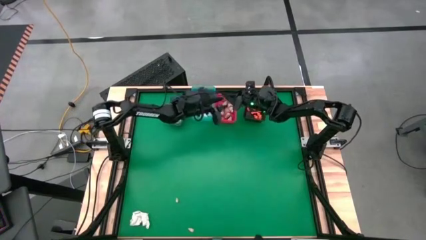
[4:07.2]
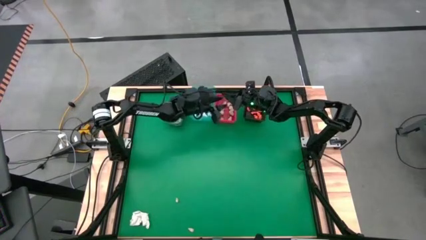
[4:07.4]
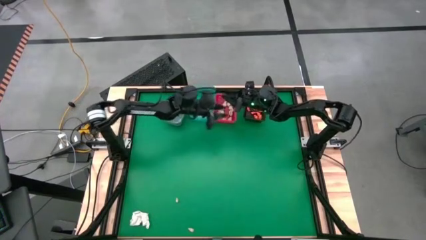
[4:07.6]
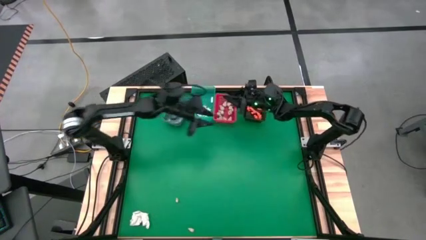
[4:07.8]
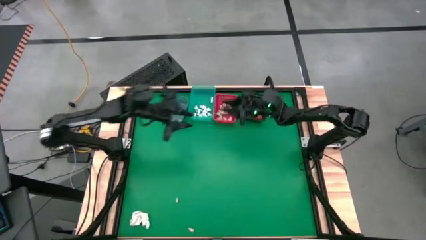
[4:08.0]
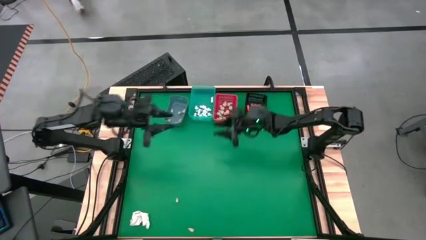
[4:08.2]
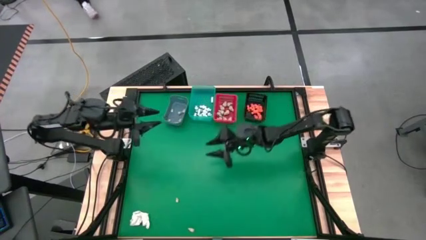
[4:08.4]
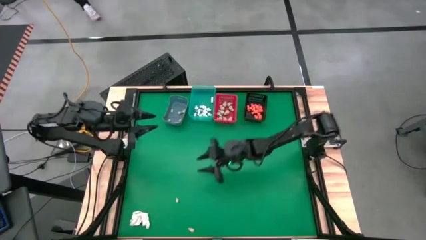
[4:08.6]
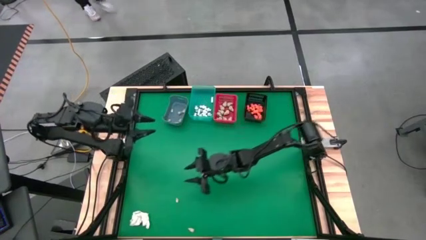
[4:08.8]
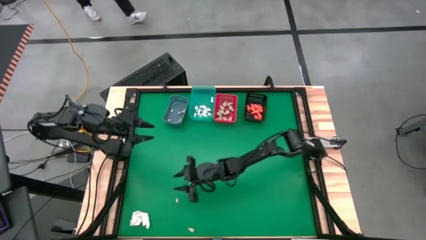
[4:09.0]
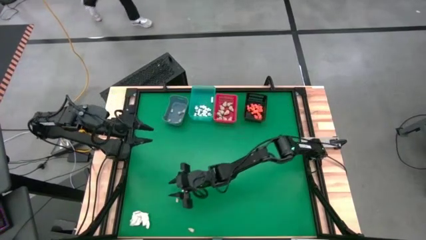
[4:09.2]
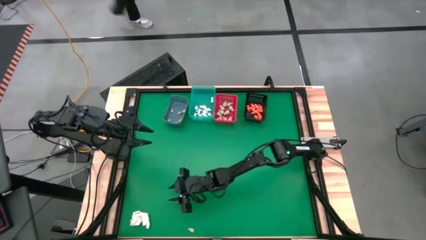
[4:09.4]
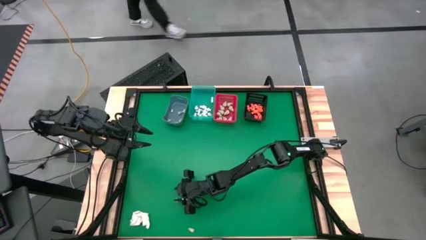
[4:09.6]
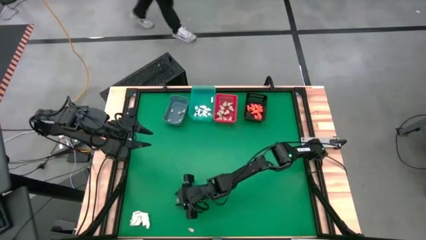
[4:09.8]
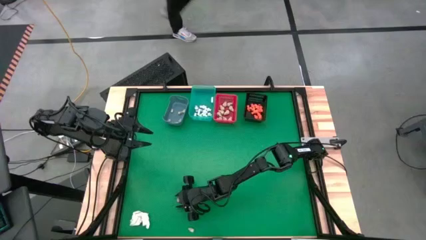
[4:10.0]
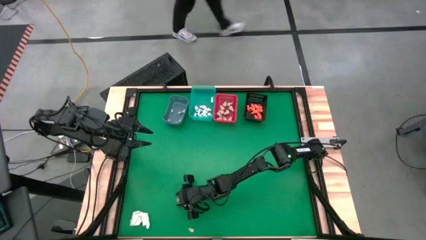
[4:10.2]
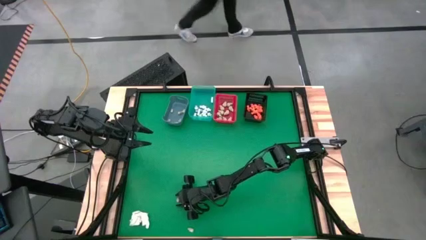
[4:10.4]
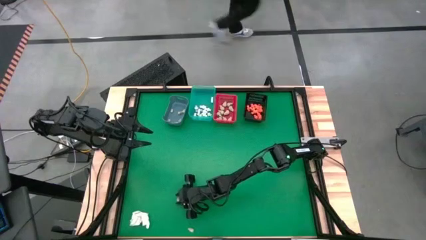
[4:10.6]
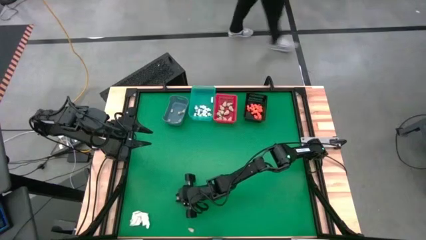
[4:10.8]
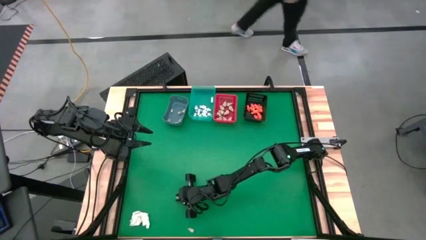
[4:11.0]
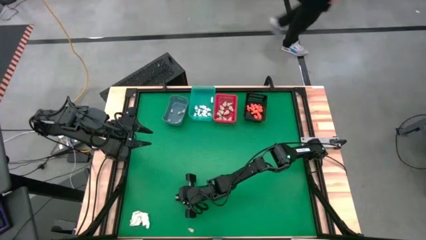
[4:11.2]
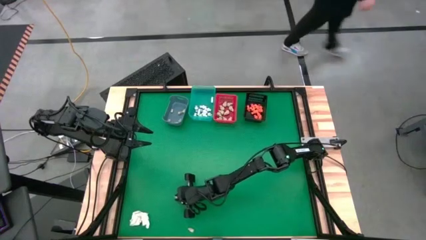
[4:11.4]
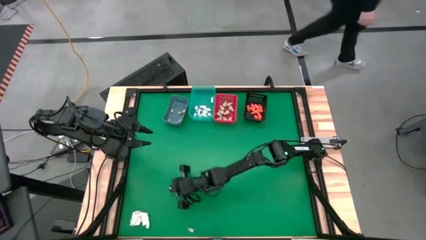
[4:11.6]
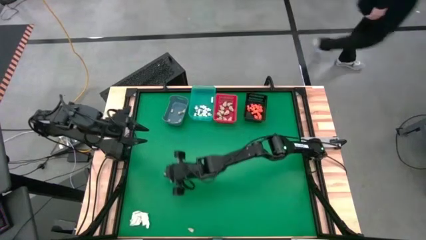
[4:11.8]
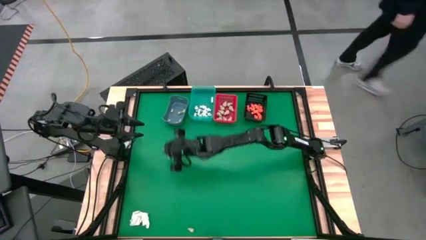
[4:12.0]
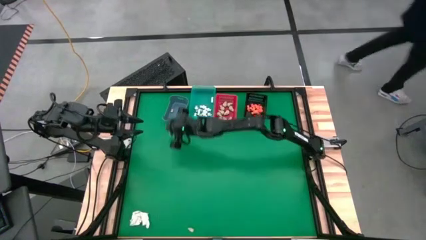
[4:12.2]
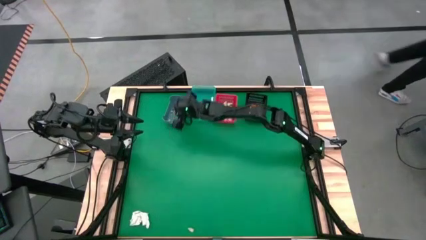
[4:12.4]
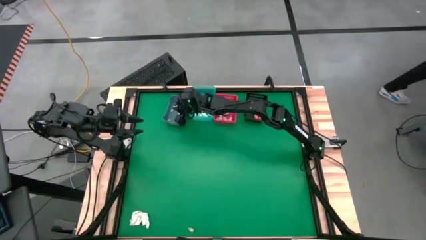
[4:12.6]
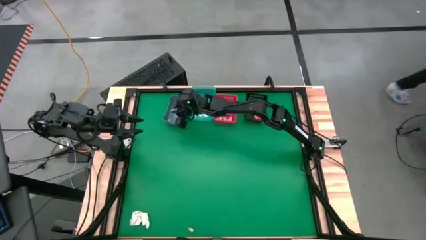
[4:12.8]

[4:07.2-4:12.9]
Task: Sort Halloween decoration
Put the white skull toy into the blue bin

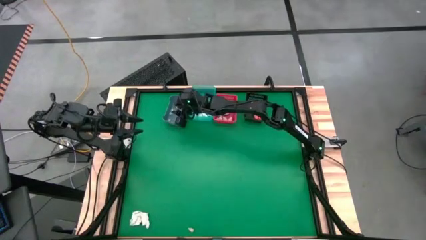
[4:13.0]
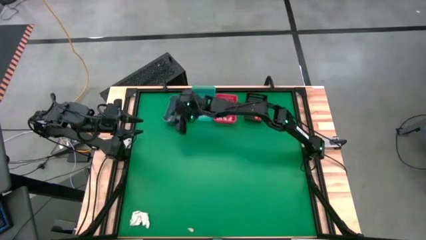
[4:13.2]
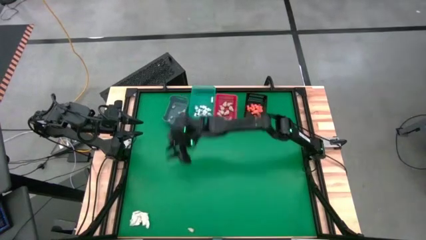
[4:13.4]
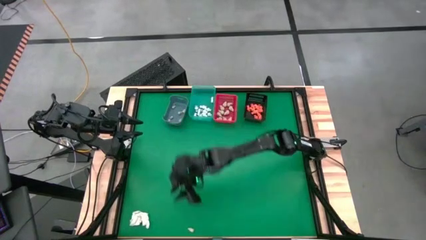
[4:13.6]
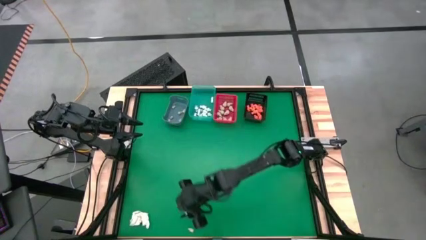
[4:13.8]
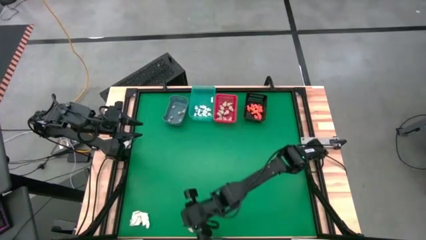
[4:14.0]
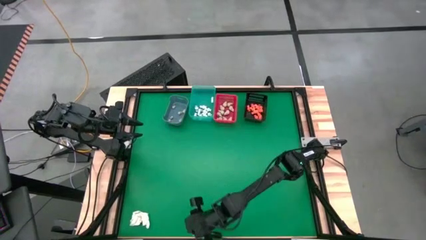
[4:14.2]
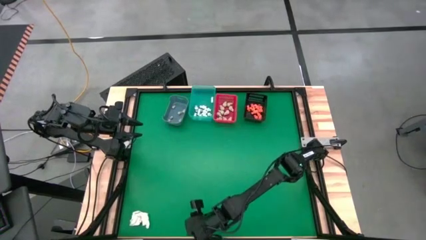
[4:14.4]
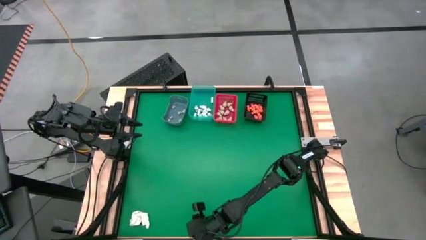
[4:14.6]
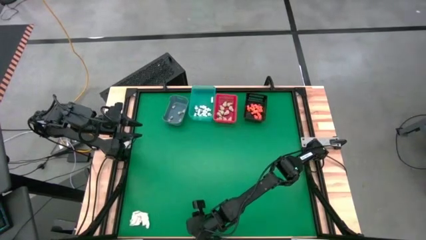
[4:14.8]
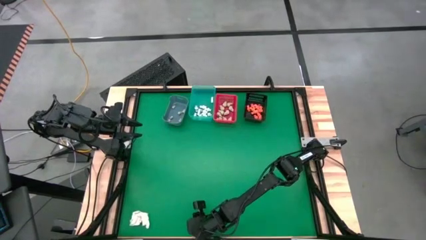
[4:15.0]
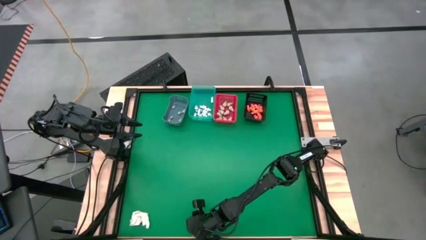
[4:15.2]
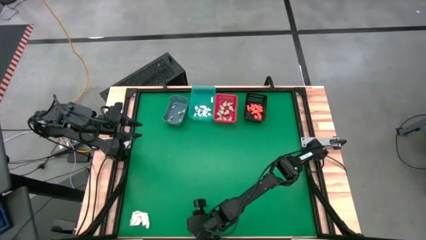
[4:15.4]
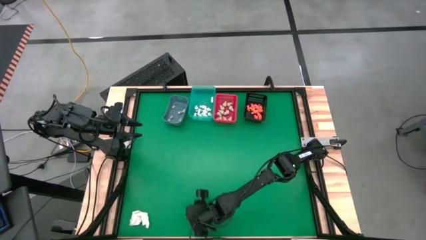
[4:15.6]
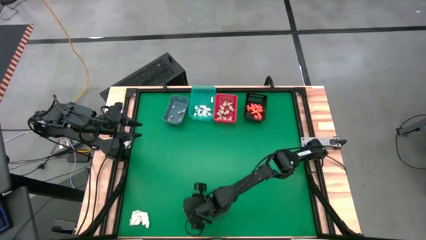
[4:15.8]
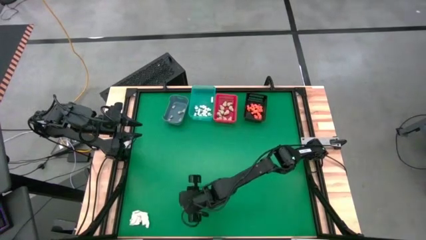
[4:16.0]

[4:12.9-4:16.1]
Put the white skull toy into the blue bin

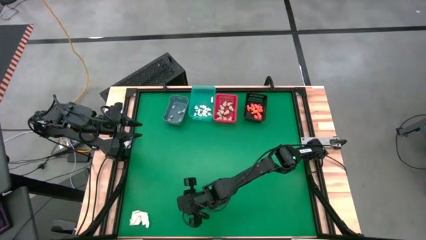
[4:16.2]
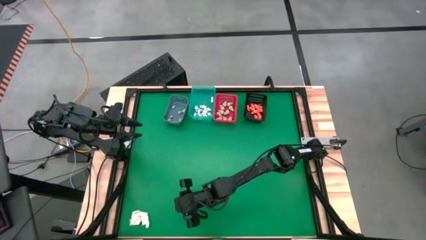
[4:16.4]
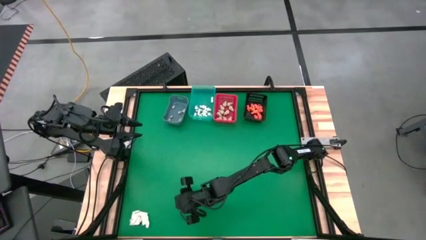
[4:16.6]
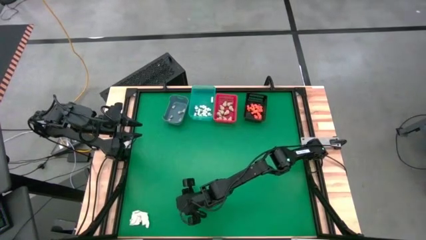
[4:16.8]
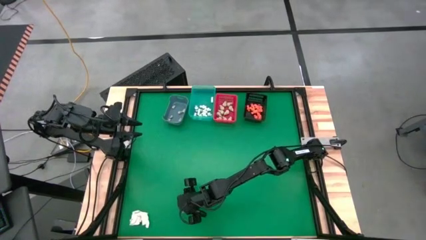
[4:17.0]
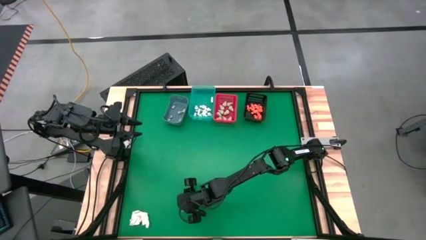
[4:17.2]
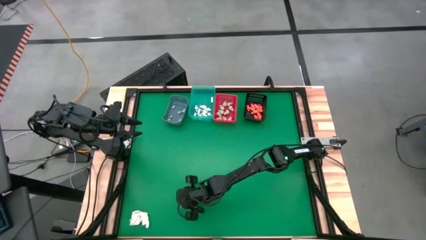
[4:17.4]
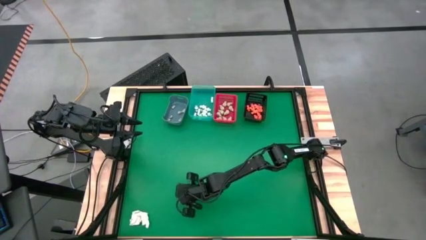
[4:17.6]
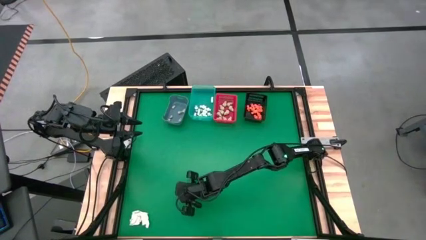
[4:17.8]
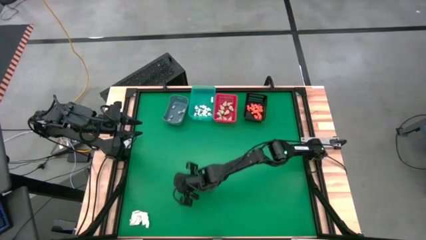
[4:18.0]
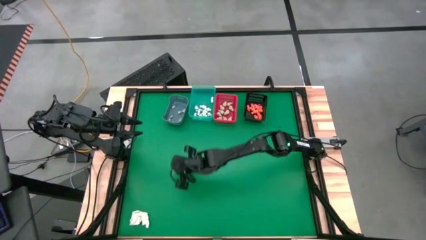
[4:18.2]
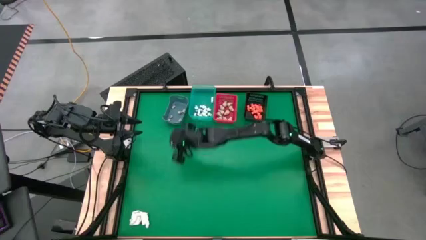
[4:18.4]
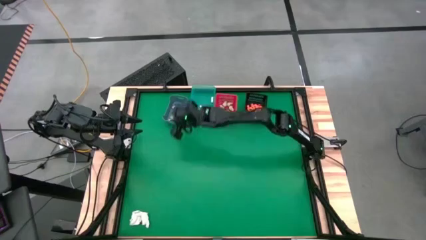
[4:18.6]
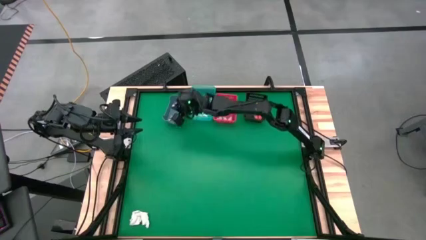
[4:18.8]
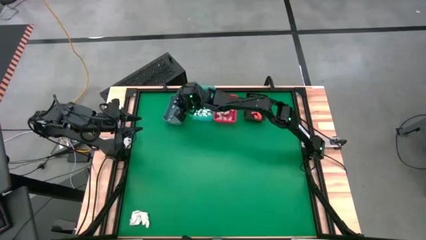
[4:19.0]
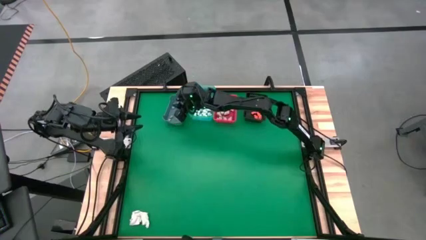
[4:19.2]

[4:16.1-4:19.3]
Put the white skull top into the blue bin
